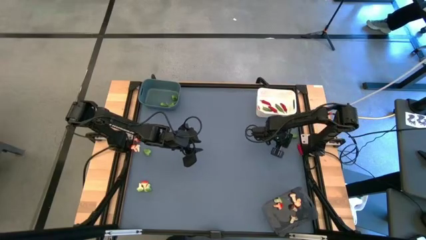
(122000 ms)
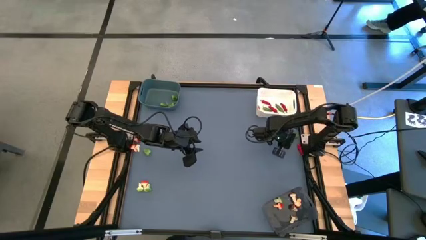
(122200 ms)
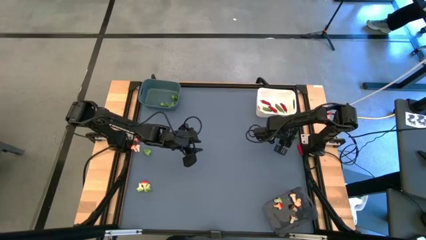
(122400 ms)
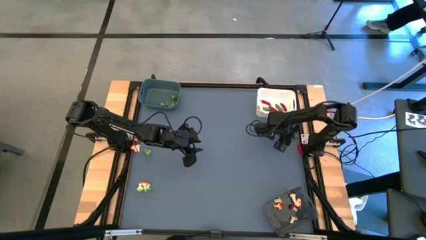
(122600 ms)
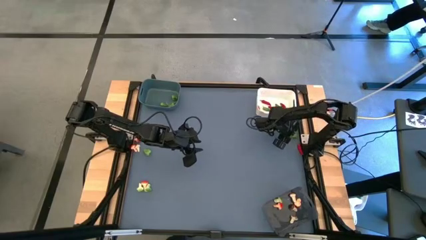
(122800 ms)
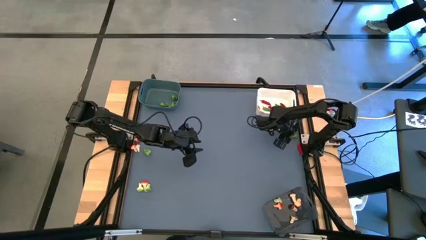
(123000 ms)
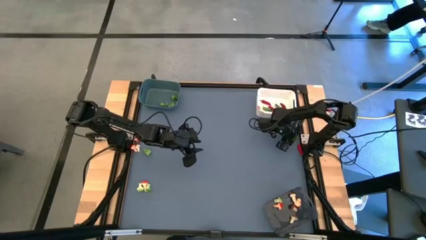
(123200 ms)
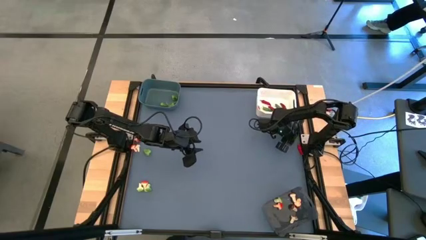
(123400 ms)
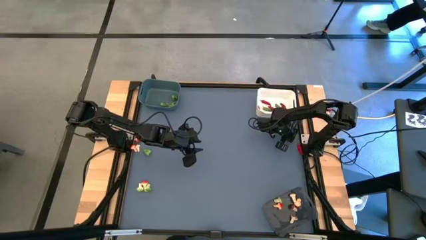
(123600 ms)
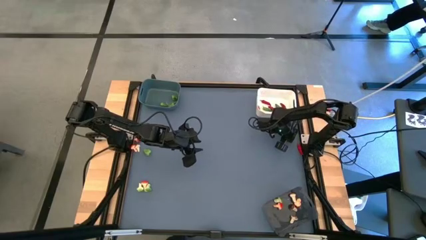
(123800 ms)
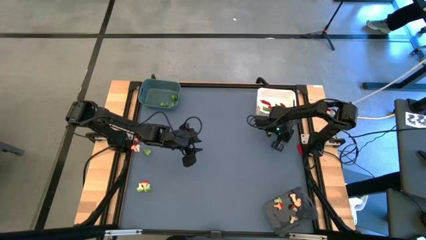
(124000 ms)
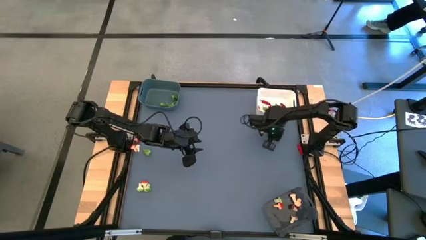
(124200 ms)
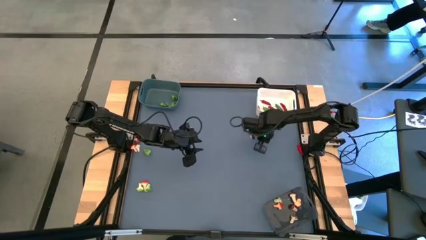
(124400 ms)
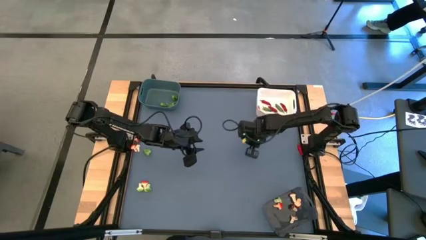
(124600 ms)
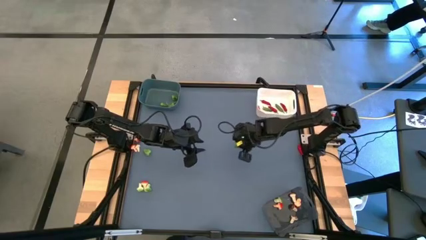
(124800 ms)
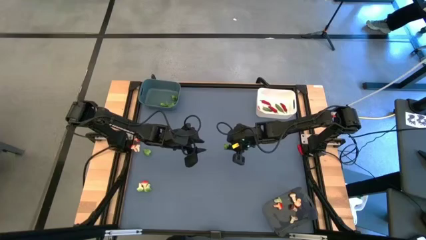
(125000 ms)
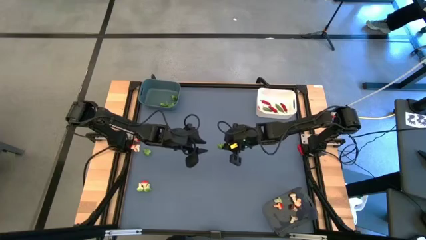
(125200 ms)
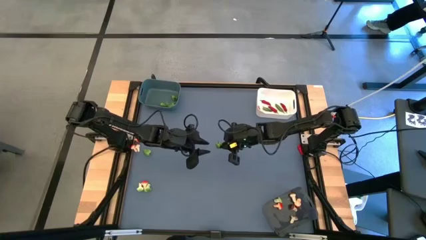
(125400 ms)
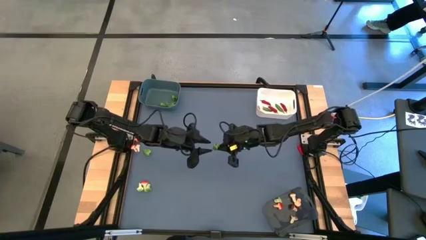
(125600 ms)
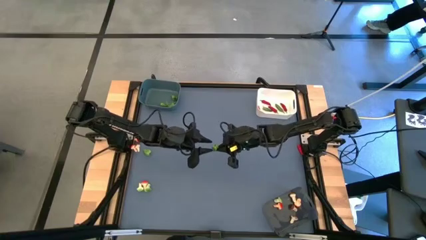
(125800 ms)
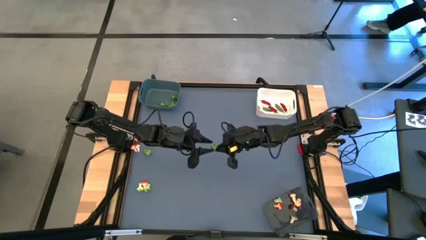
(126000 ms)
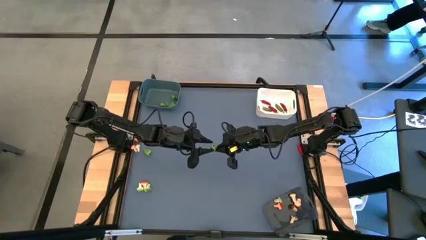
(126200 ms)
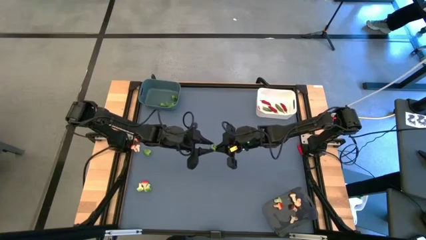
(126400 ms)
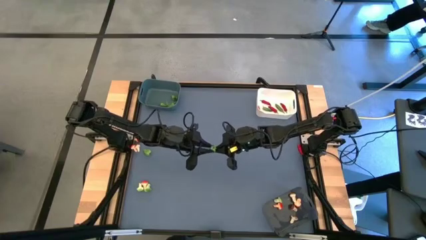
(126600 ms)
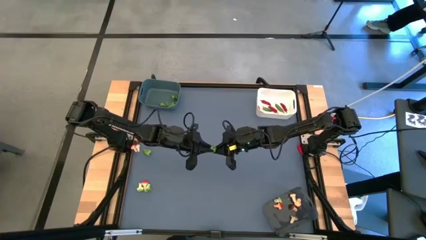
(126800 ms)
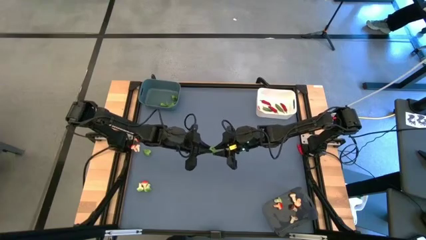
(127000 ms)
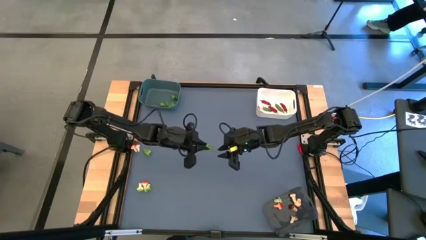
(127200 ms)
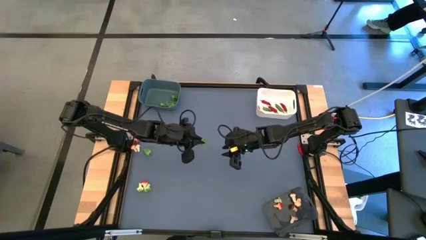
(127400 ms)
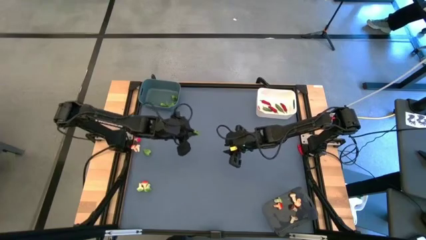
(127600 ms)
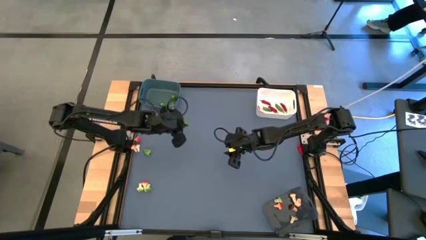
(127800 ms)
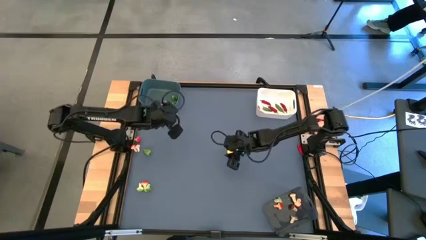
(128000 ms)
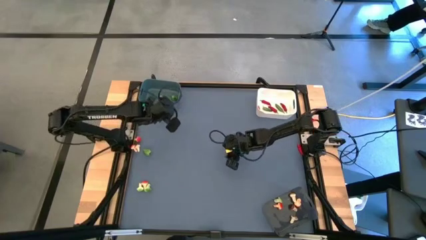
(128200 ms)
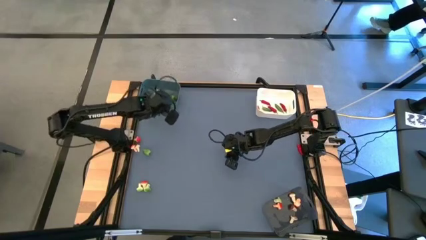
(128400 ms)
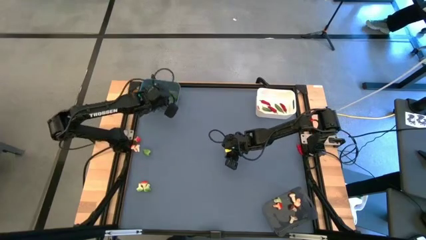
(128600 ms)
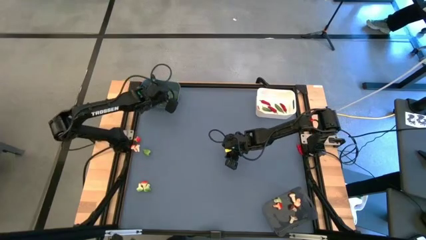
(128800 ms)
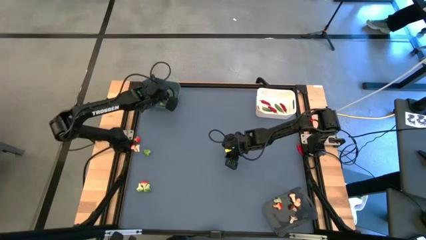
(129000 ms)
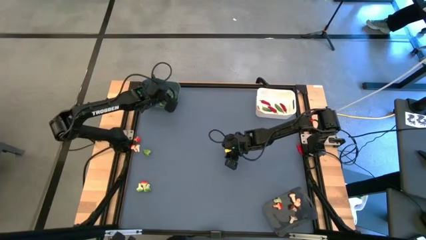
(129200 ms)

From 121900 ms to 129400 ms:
Task: Sort produce into baskets
Put the green bell pepper into the blue bin

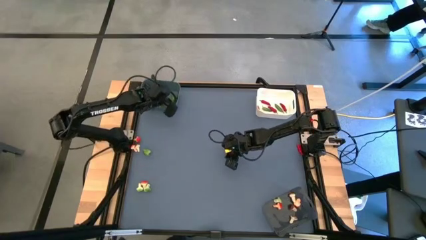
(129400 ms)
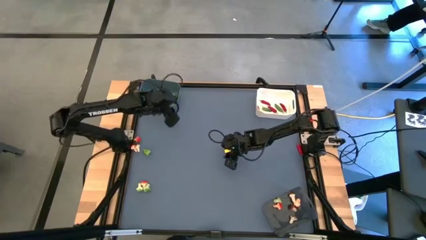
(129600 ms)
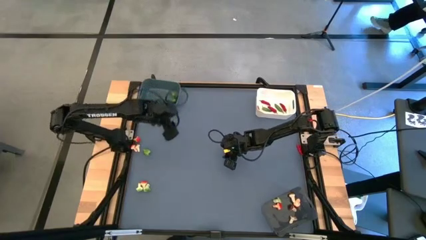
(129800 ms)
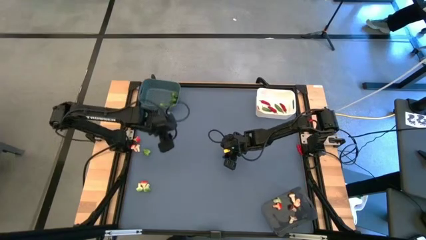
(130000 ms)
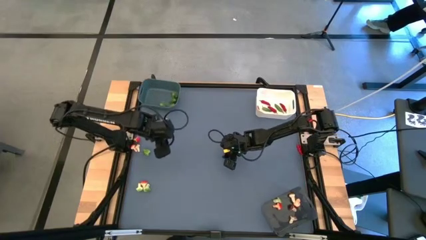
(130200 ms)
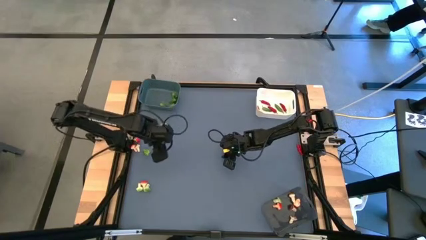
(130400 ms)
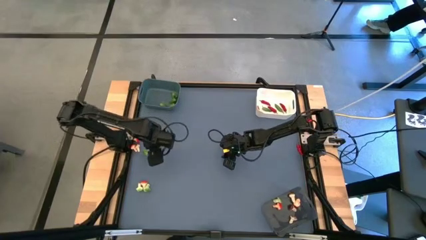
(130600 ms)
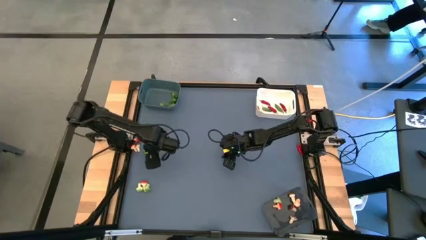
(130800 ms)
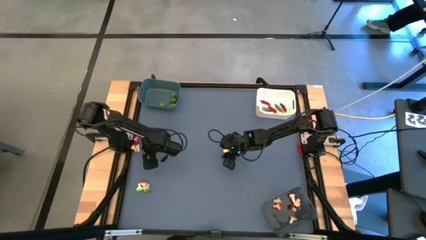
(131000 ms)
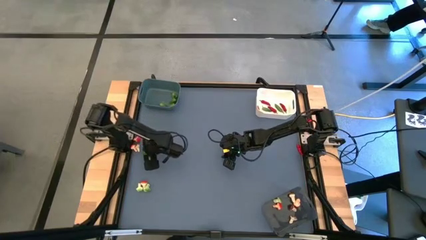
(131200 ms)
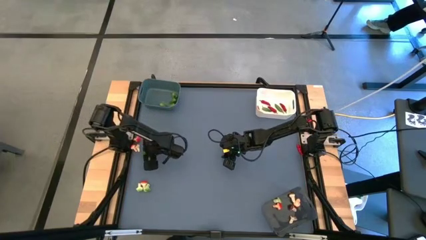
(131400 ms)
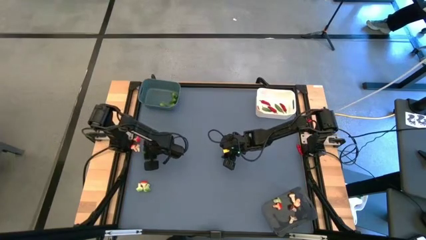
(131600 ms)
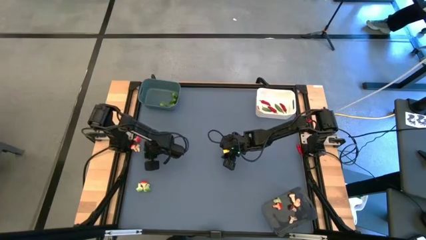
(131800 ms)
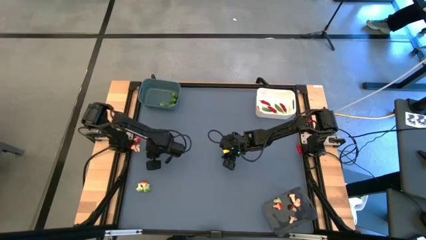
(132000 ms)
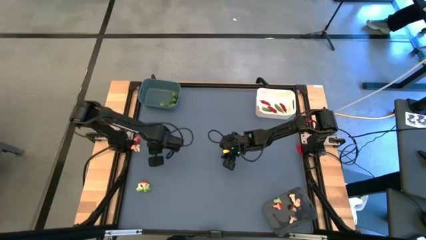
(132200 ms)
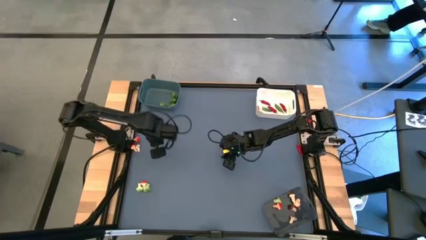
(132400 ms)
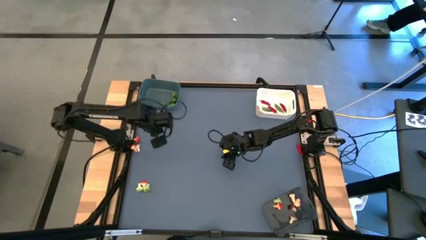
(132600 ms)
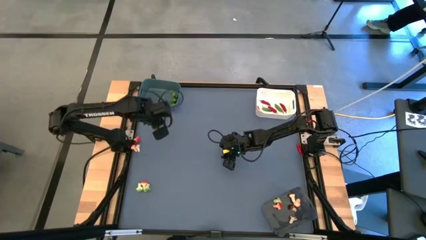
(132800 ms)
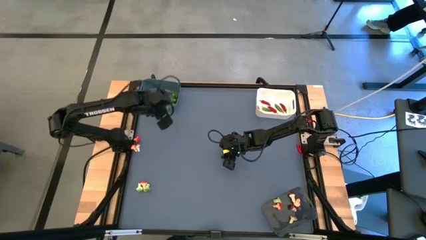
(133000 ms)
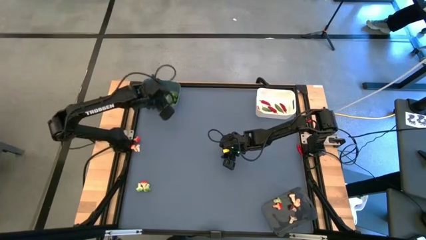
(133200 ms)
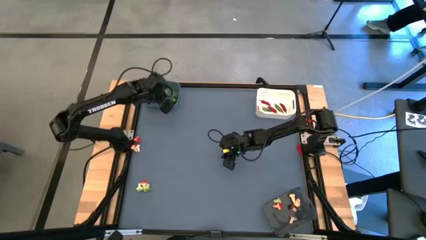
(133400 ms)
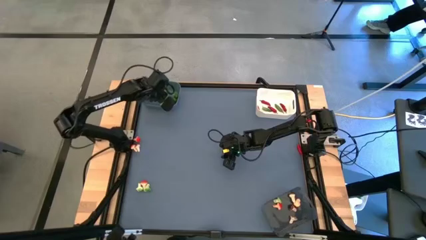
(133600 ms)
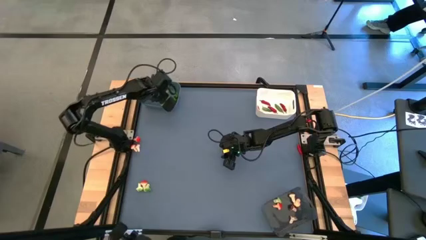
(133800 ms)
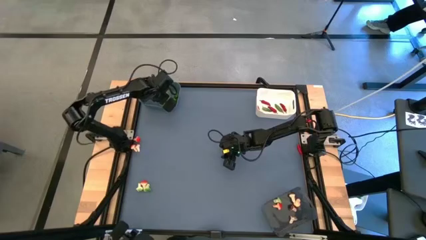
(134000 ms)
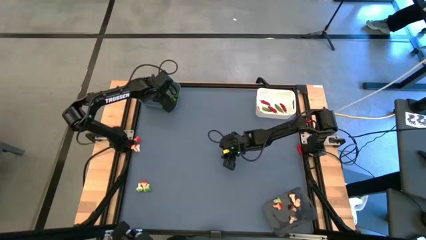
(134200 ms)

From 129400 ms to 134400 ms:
Put the green bell pepper into the blue bin

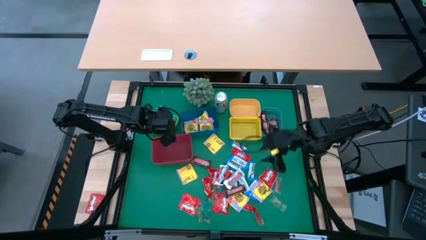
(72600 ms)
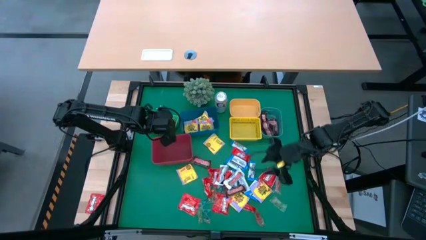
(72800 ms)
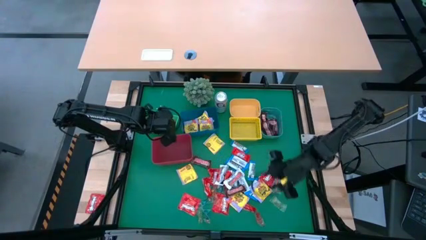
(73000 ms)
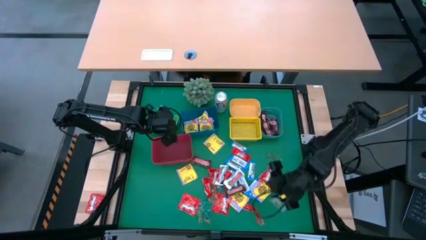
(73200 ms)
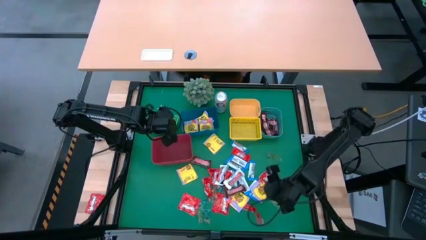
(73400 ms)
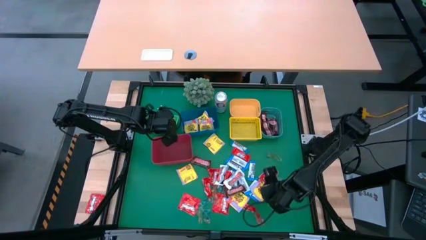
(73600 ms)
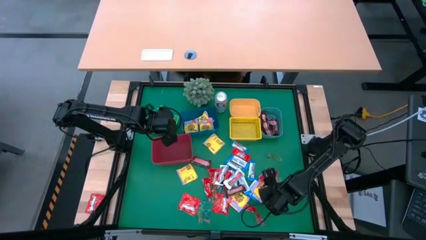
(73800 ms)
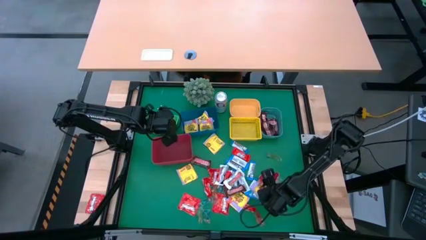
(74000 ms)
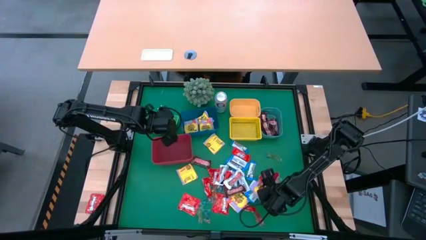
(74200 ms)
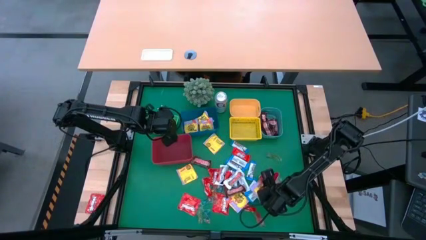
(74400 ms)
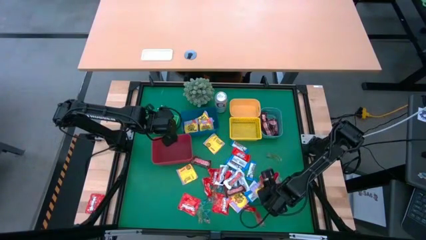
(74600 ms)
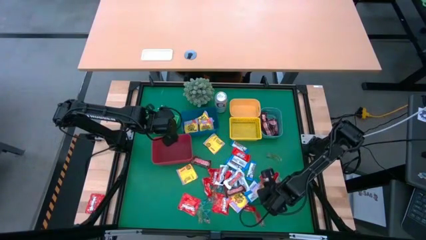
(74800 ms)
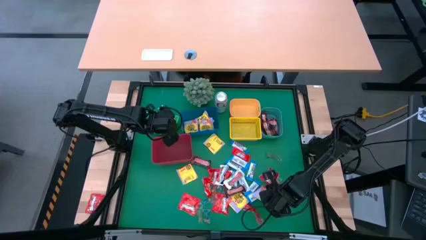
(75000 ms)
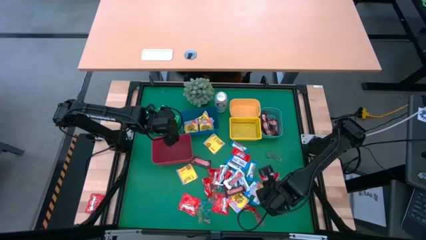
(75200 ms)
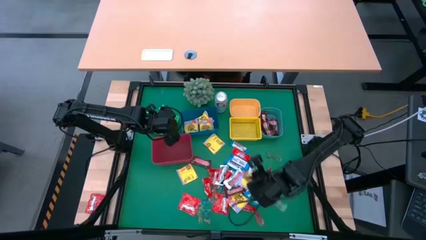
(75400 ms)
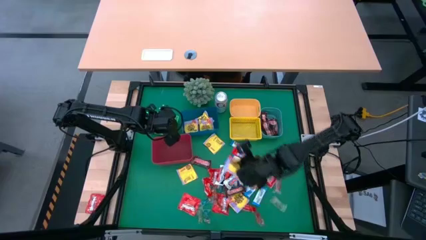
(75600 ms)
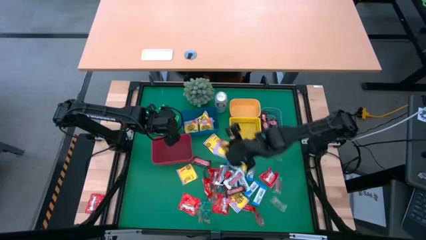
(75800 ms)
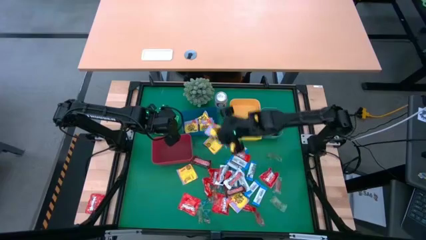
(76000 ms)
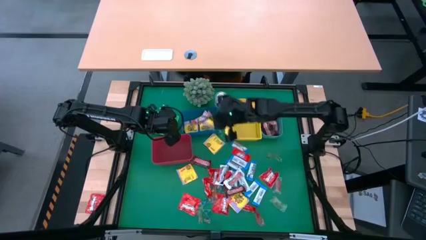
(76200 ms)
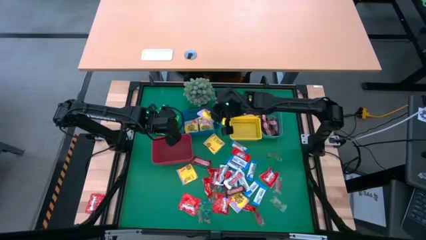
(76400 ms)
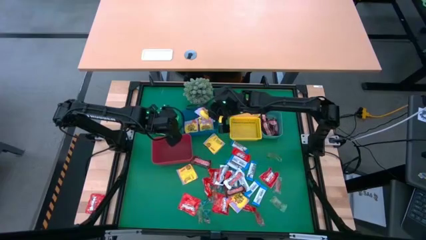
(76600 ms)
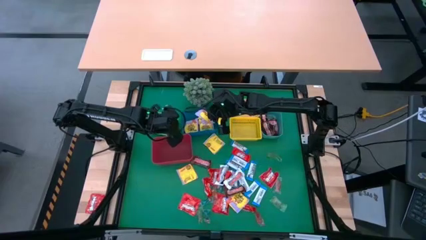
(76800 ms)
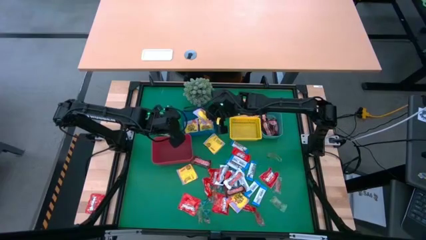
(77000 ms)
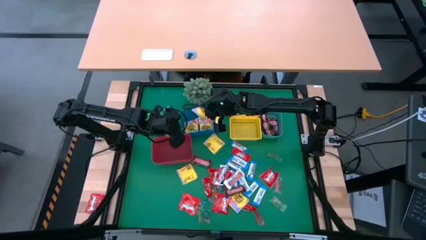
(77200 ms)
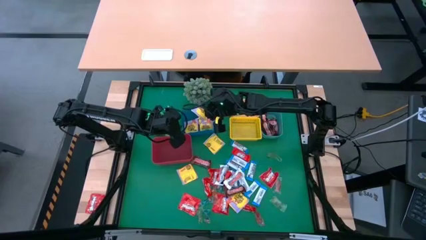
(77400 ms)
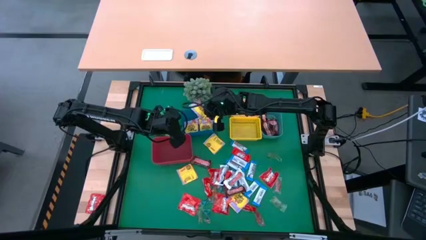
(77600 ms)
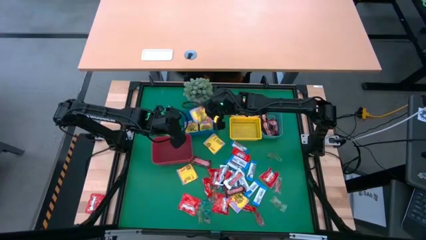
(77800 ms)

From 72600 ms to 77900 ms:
Task: Sort candy
Put the yellow candy pack into the blue bin
